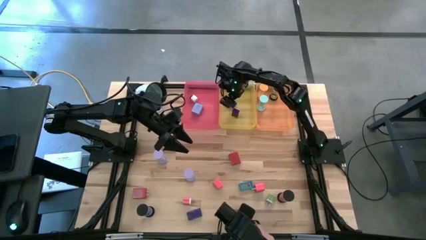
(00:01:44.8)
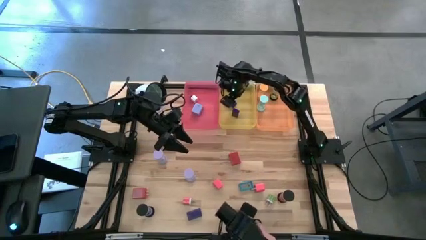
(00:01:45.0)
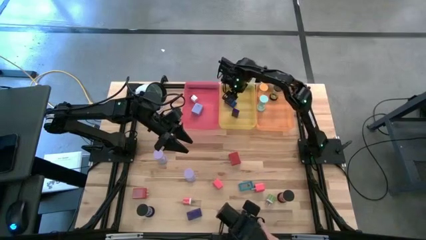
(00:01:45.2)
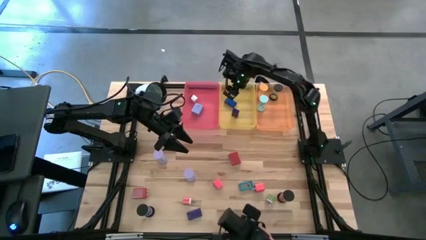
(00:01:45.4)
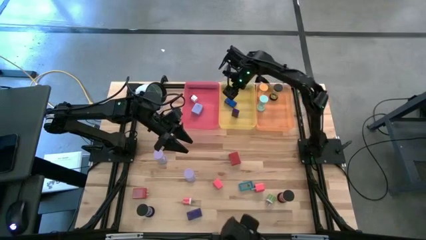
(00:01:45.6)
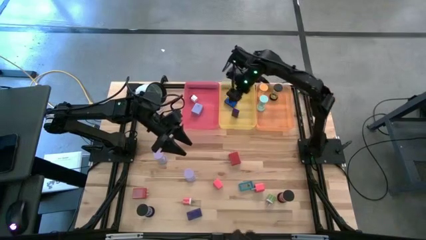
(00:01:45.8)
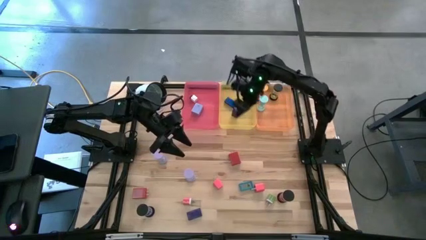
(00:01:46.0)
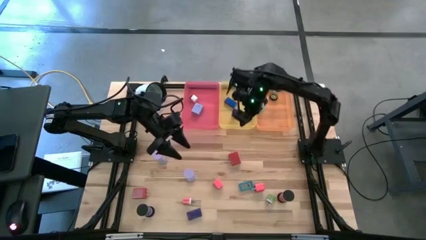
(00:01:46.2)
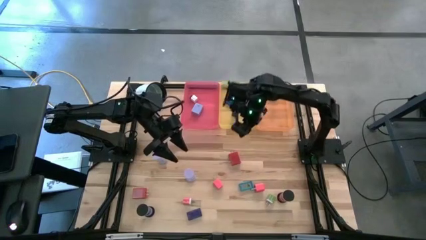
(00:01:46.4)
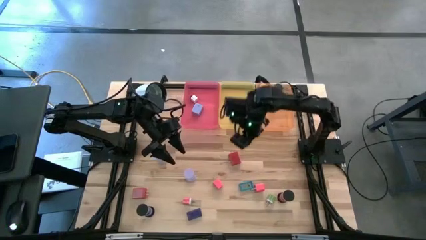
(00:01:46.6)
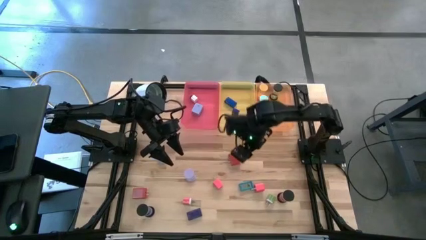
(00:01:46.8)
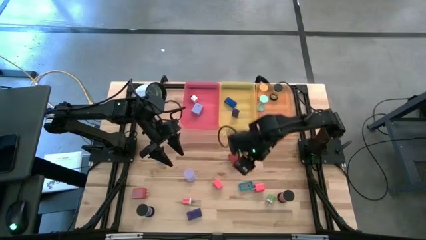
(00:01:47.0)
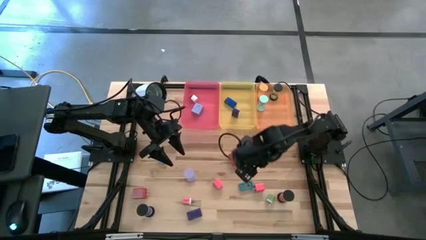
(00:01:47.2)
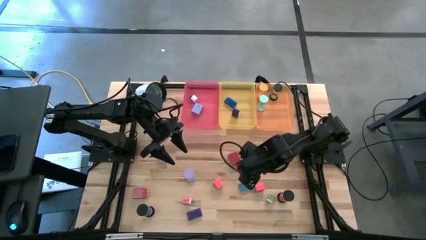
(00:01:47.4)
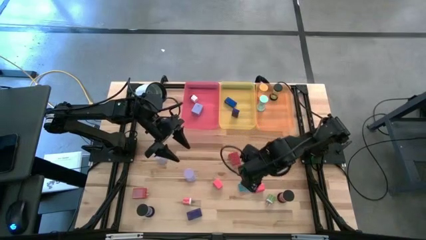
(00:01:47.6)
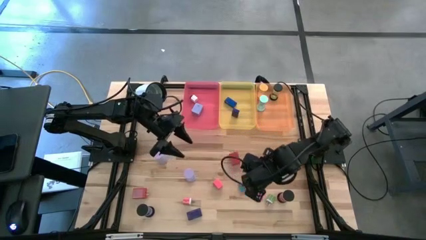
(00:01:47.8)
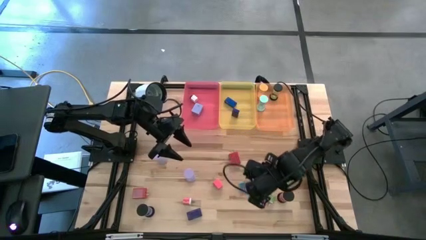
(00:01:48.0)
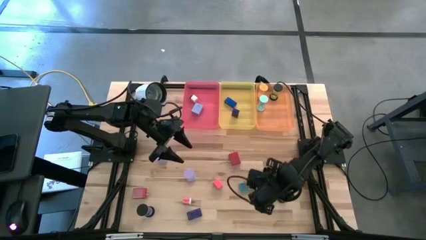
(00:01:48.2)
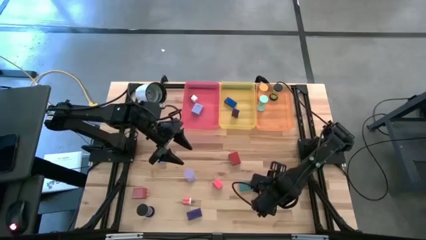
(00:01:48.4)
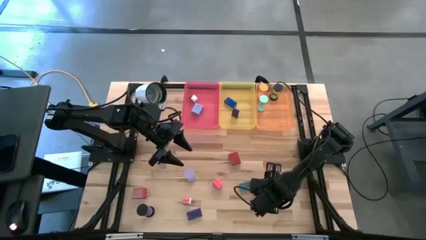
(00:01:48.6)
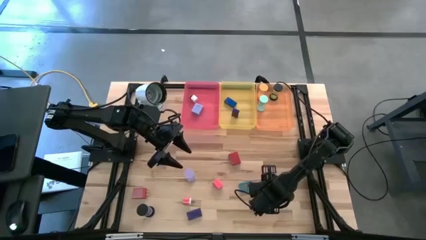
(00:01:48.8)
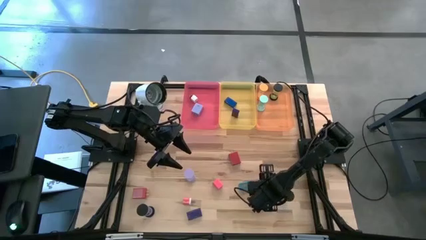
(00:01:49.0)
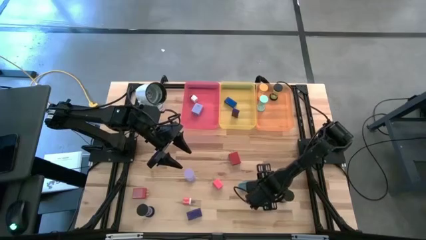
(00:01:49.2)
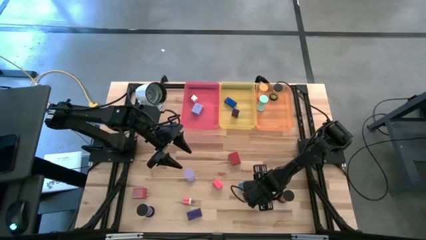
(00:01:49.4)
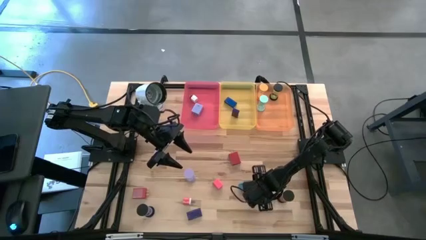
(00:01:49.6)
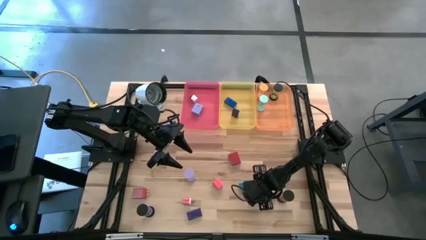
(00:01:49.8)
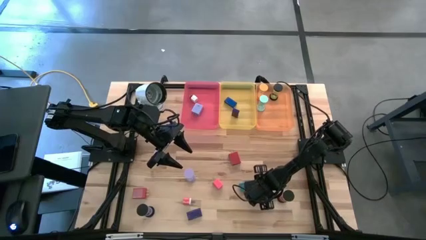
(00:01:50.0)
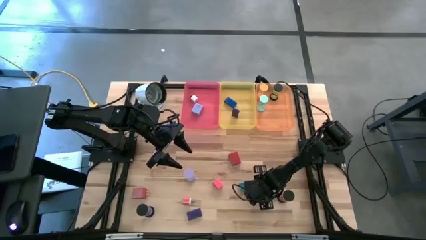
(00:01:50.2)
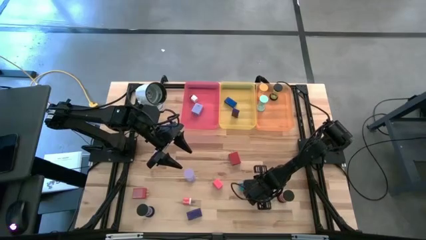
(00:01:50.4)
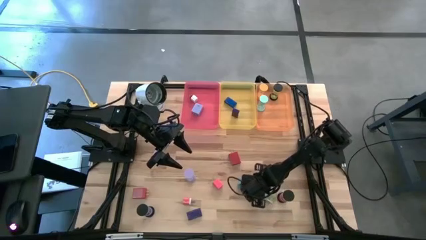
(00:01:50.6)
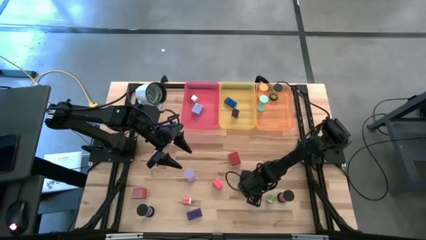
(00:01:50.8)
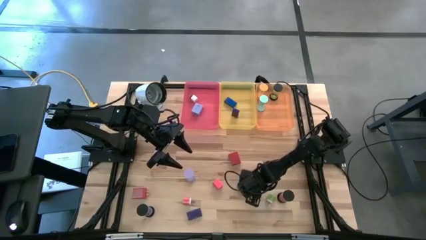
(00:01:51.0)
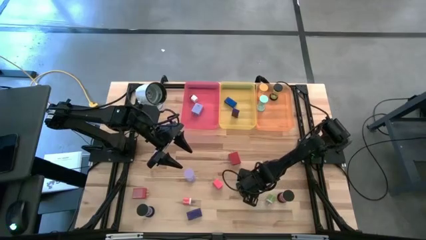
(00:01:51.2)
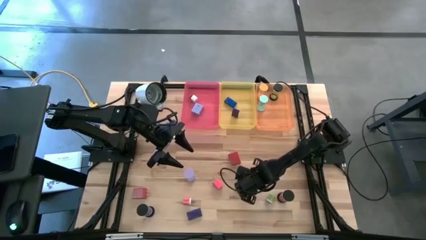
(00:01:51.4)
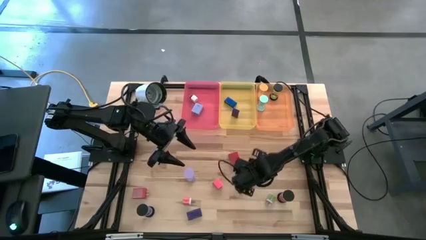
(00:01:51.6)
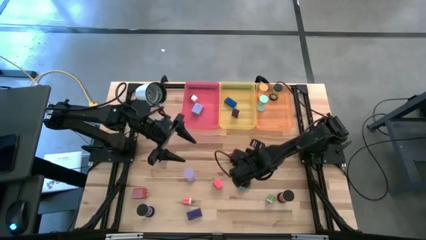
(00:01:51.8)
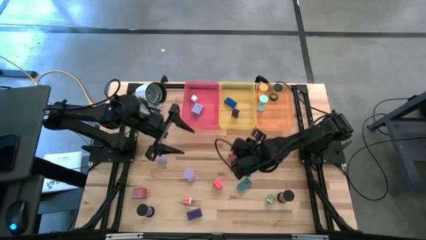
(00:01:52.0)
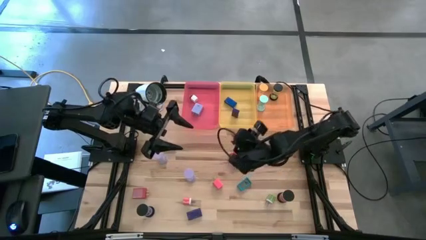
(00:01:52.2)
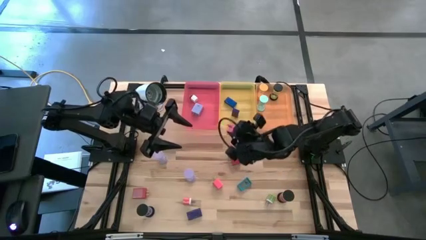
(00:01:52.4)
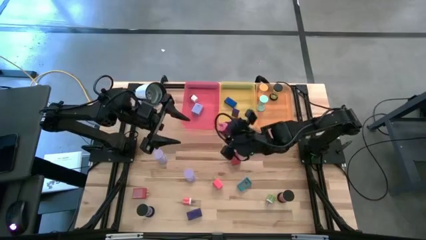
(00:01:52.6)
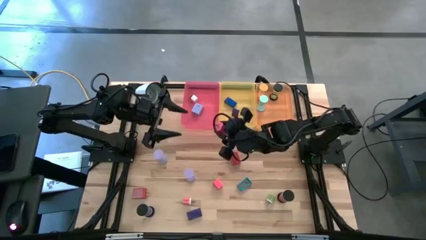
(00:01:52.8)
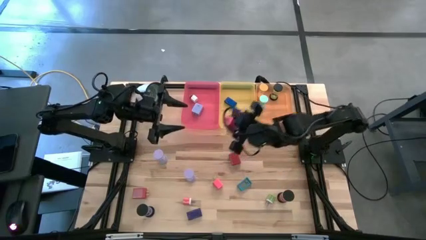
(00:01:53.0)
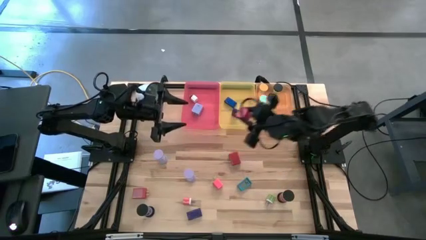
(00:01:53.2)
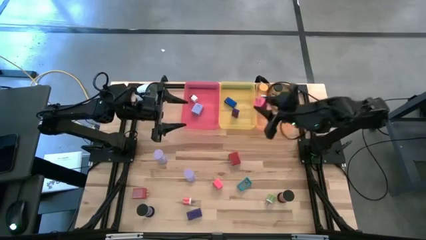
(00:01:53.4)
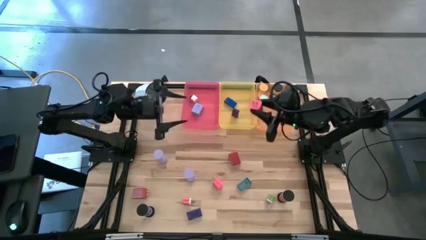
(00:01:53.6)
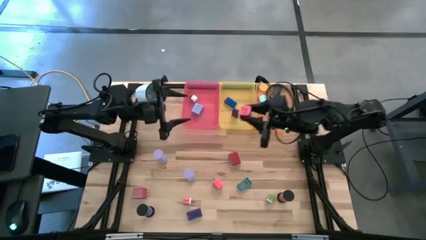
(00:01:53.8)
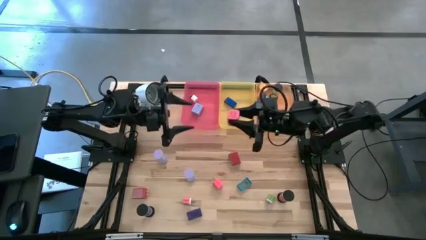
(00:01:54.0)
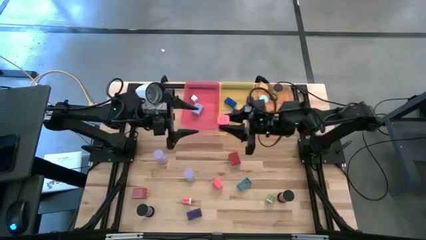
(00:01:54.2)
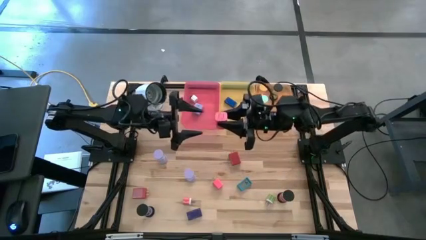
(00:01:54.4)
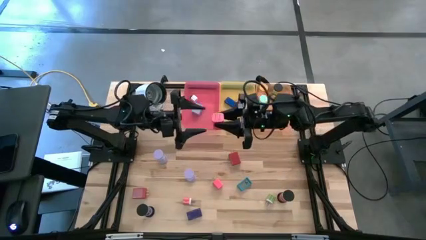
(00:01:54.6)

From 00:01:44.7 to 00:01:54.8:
Task: Pick & Place Office items
Put the right pink charger adapter into the red bin

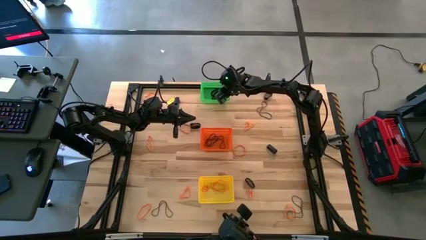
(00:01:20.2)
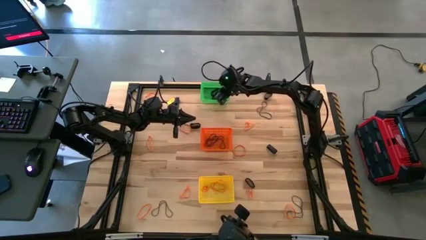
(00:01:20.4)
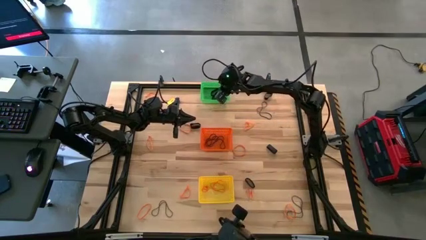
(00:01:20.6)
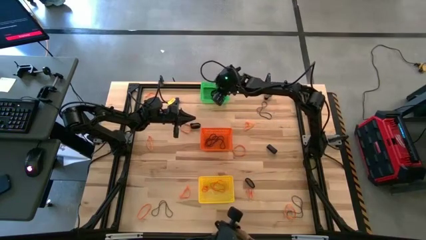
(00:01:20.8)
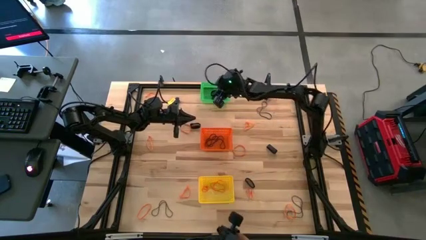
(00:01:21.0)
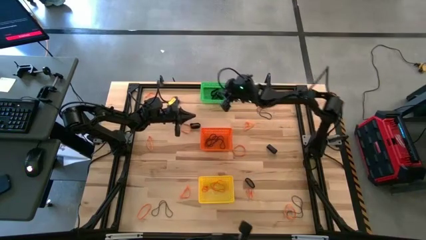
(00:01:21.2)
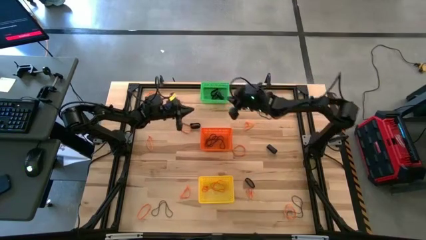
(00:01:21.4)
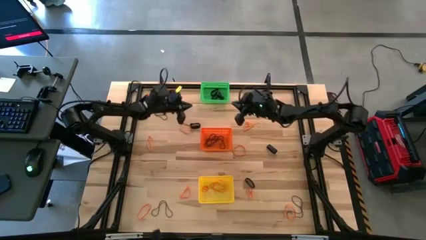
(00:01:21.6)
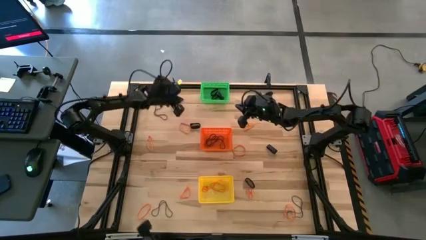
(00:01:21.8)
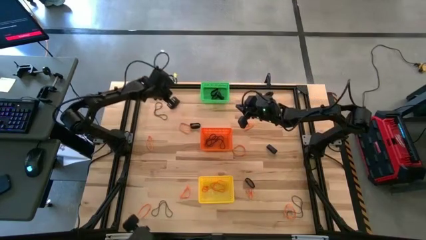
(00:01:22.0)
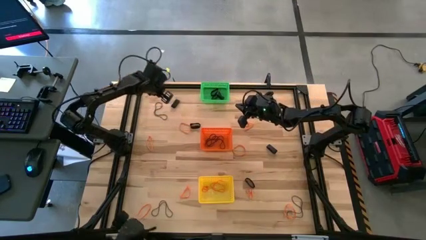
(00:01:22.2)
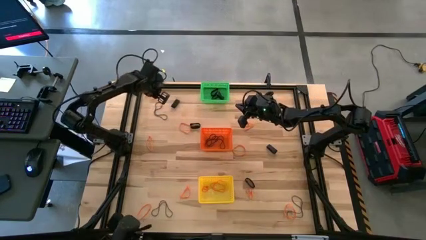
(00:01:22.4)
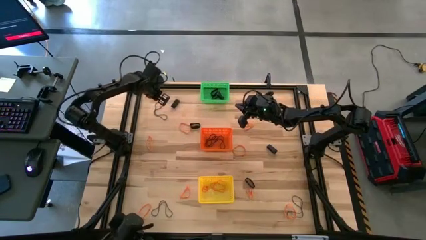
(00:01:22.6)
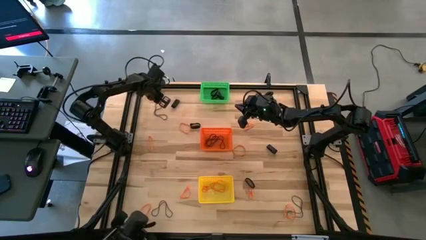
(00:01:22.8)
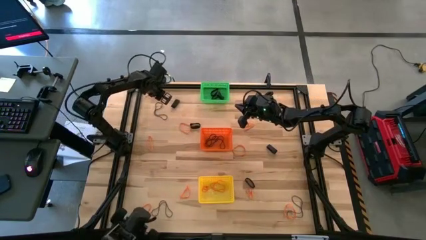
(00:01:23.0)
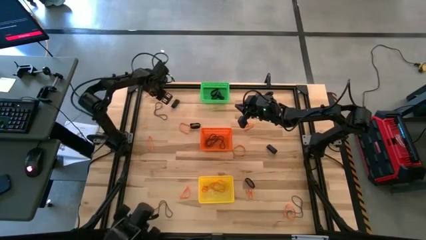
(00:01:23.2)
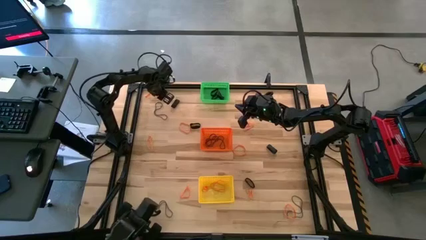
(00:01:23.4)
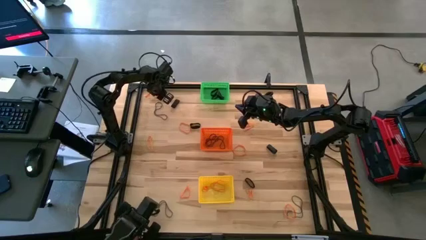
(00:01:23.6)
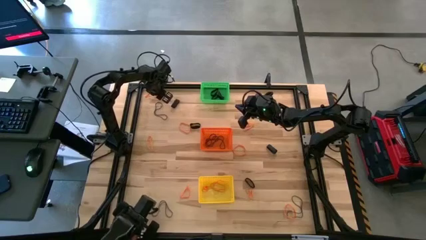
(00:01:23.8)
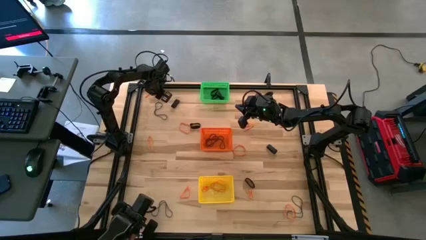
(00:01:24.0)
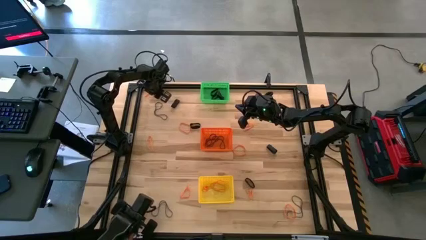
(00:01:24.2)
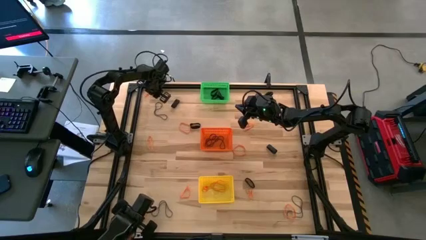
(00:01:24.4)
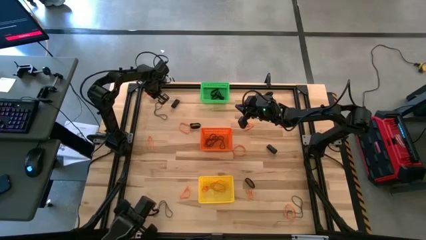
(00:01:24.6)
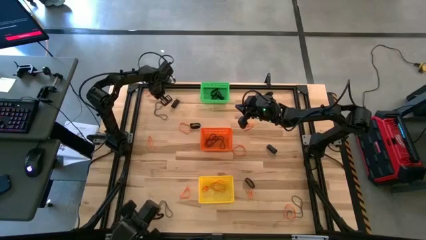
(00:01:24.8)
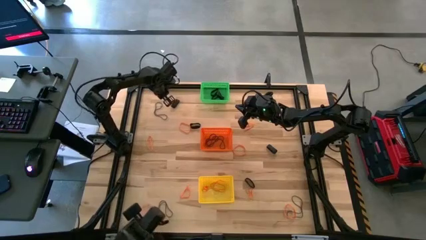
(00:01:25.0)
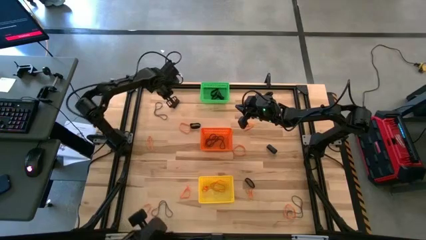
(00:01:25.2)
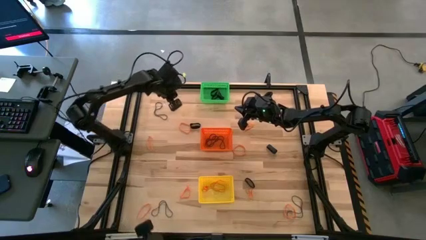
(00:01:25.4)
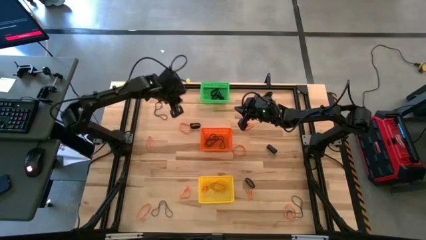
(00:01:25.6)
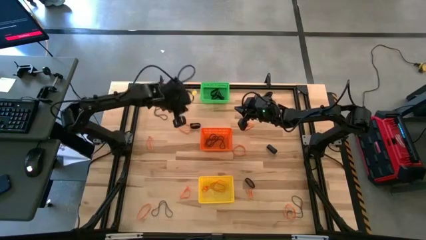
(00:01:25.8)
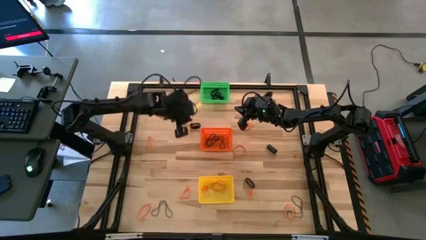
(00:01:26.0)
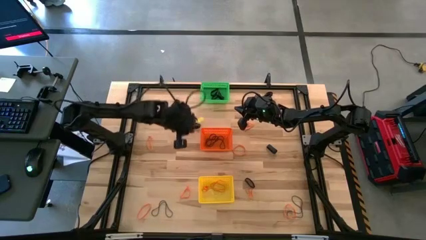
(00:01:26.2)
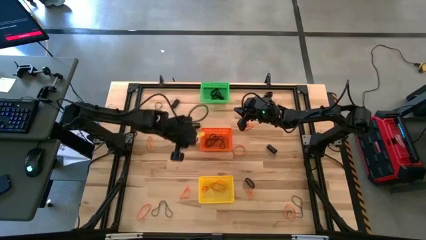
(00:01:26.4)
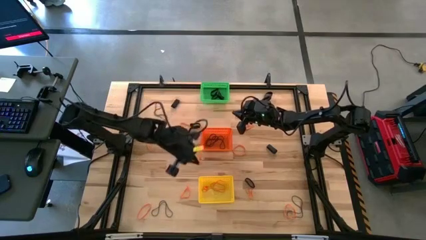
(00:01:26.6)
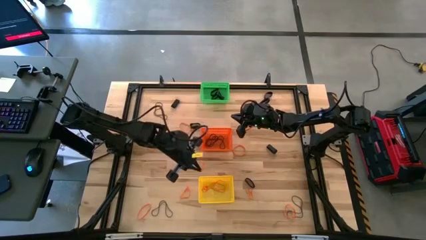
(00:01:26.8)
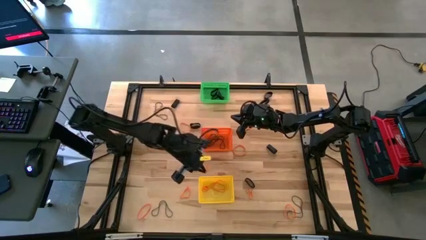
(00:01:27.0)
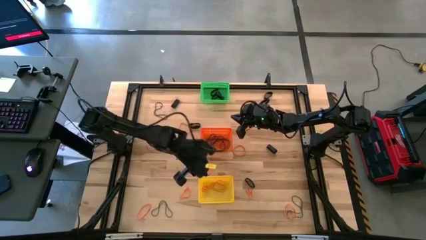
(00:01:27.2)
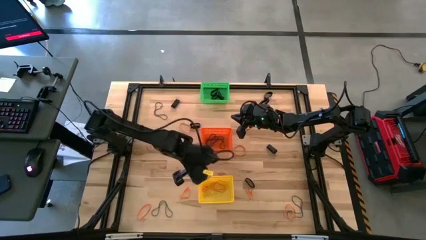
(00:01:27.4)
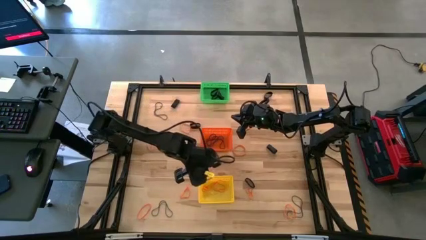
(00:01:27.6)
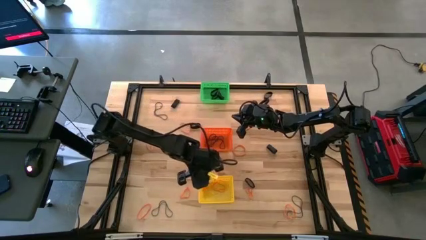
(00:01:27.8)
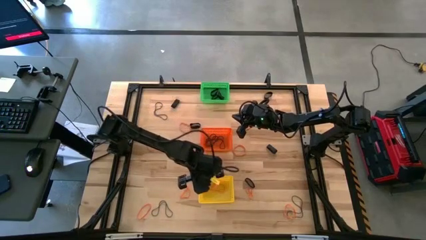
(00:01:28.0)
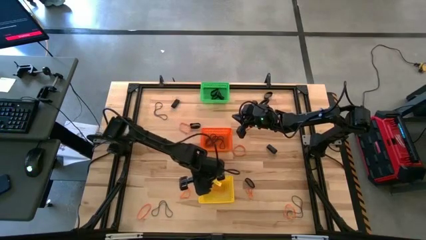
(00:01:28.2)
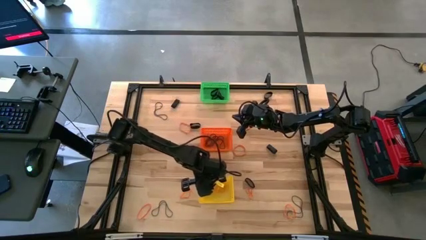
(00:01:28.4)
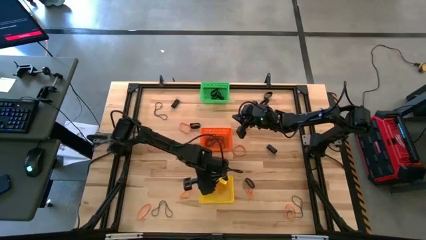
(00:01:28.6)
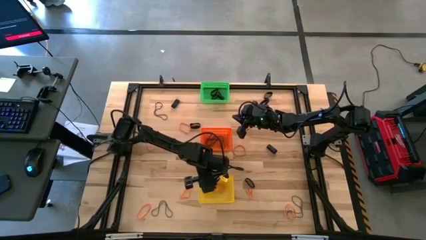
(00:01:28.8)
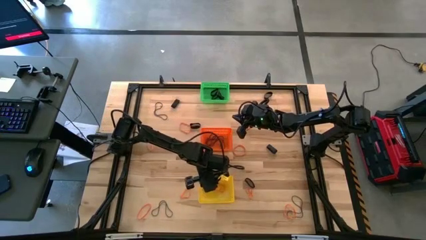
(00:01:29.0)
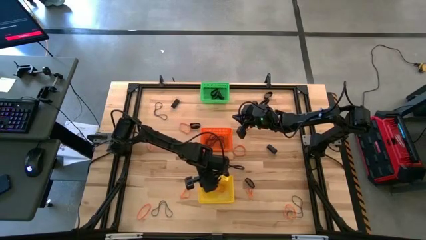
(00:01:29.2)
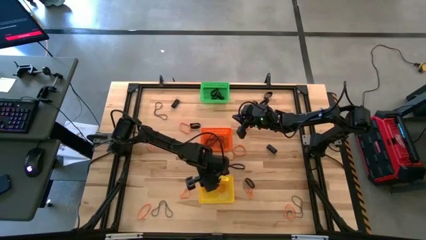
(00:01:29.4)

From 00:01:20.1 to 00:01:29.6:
Task: Sort rubber bands into baskets
Put the orange rubber band into the yellow bin
